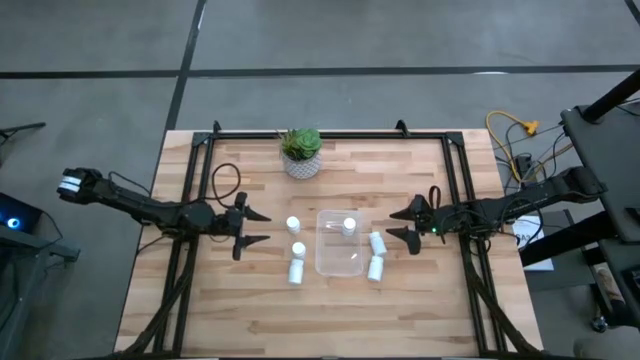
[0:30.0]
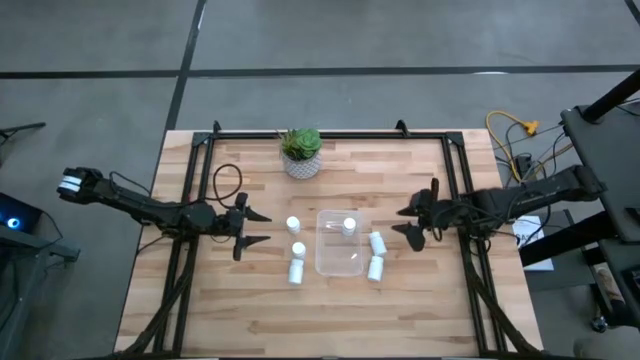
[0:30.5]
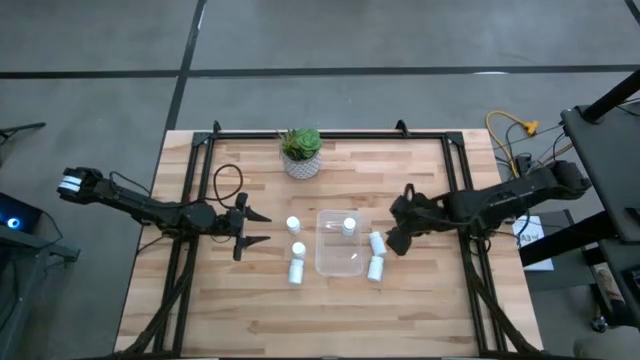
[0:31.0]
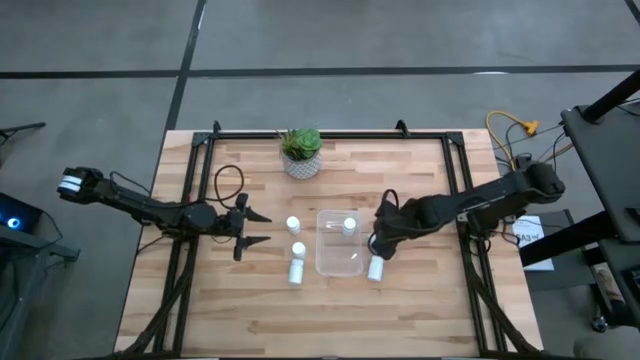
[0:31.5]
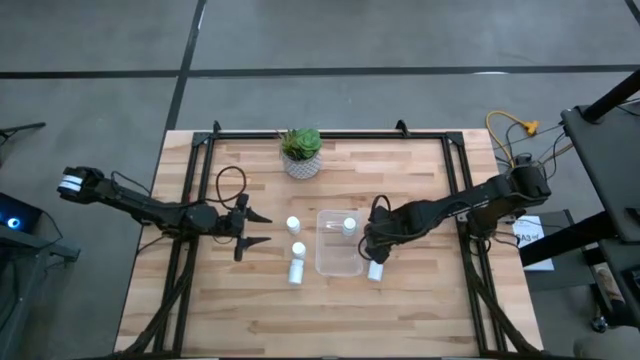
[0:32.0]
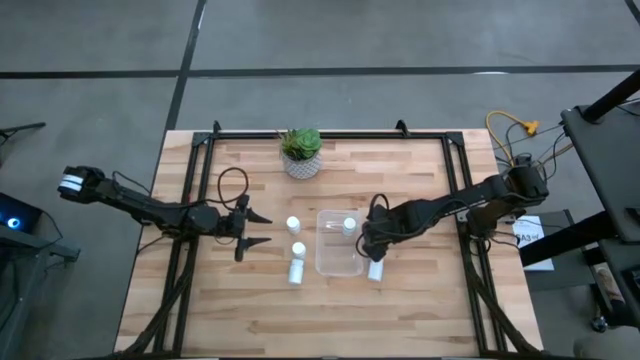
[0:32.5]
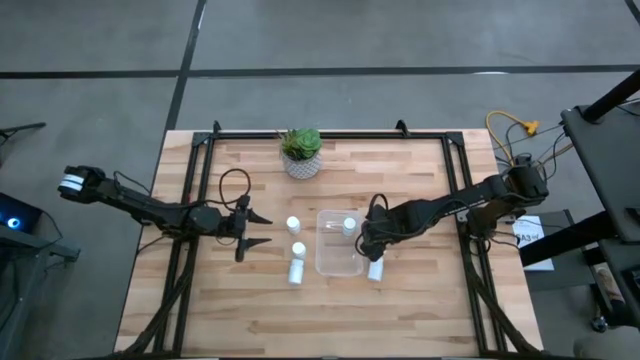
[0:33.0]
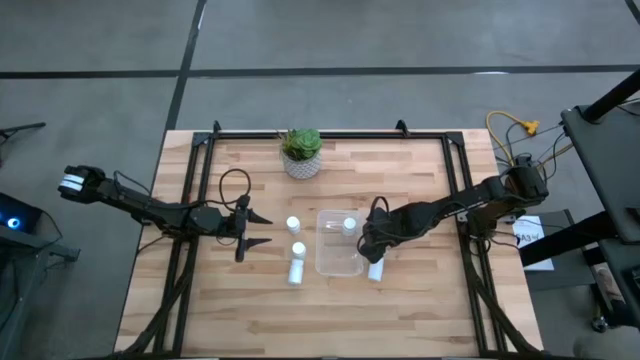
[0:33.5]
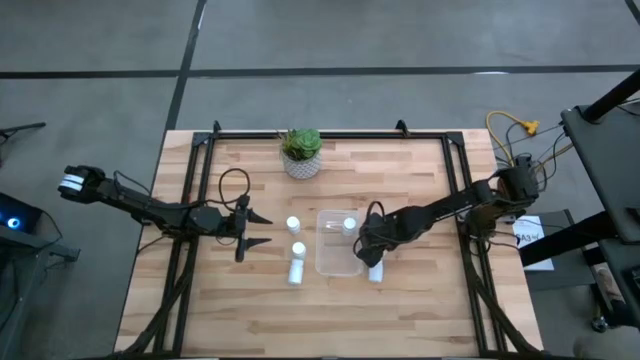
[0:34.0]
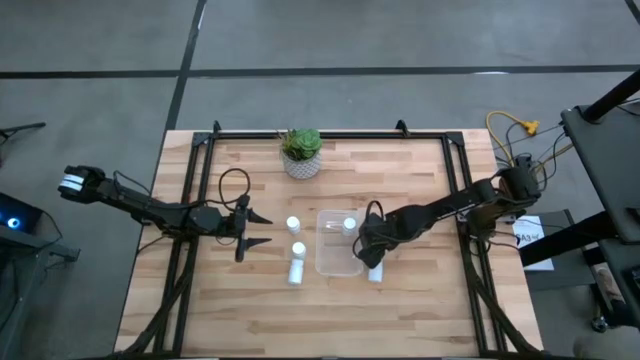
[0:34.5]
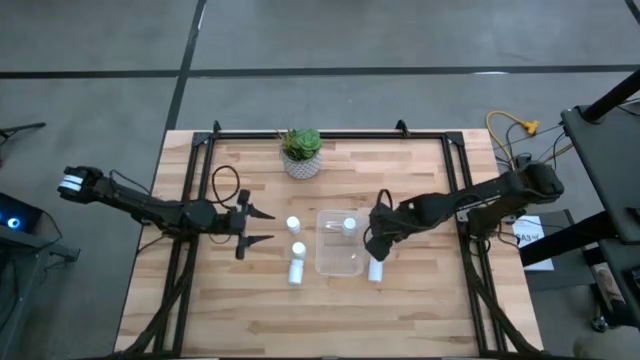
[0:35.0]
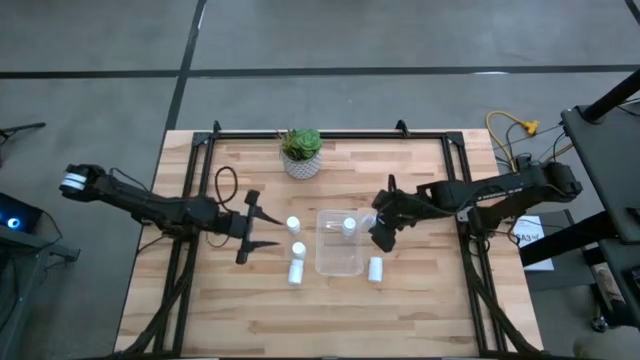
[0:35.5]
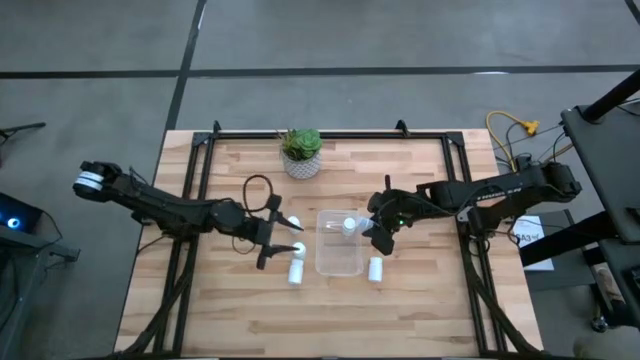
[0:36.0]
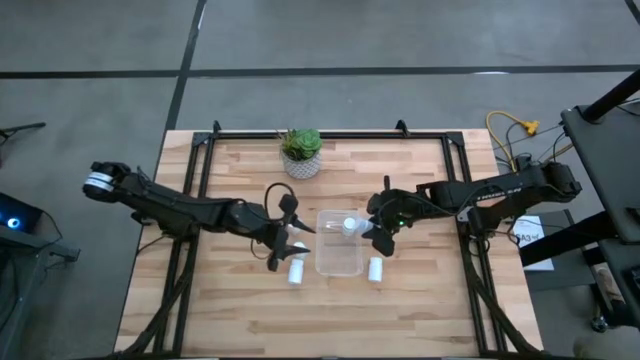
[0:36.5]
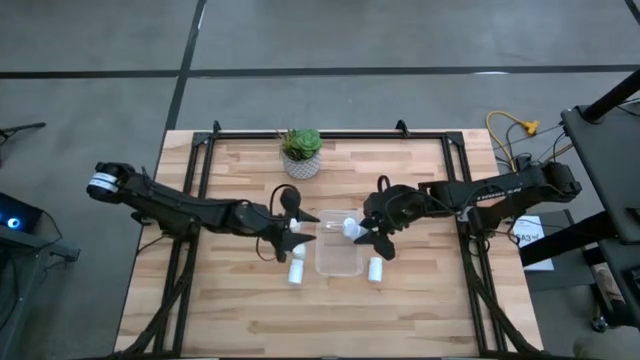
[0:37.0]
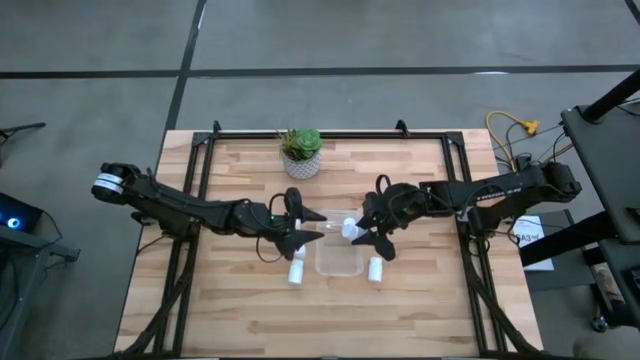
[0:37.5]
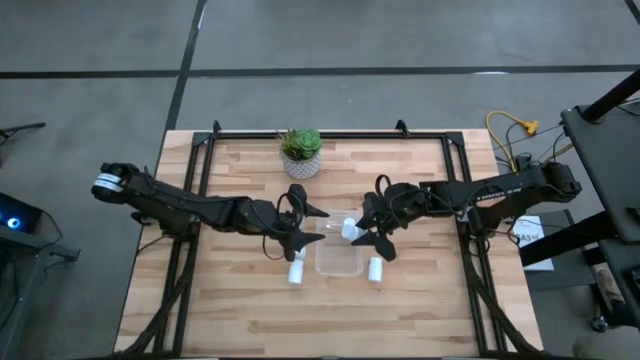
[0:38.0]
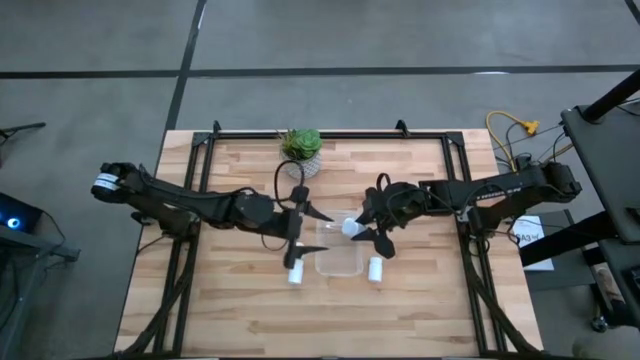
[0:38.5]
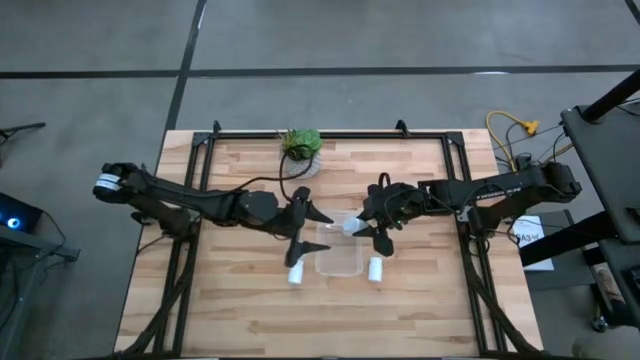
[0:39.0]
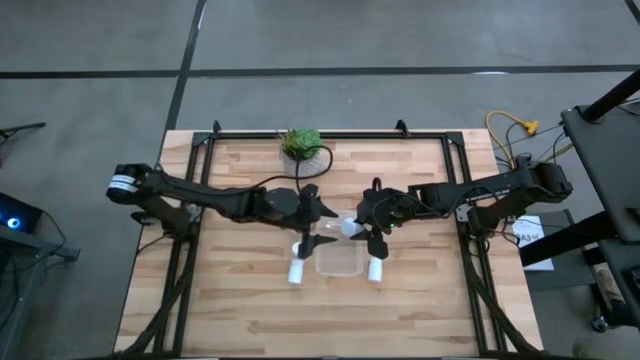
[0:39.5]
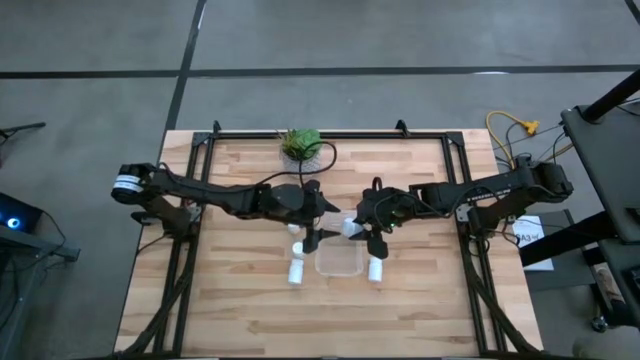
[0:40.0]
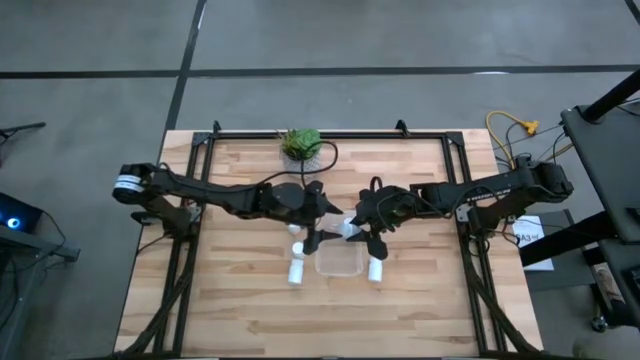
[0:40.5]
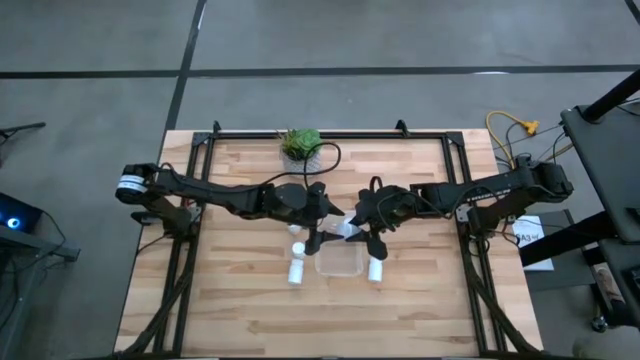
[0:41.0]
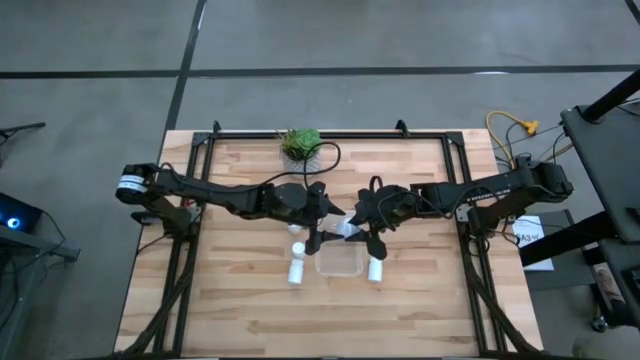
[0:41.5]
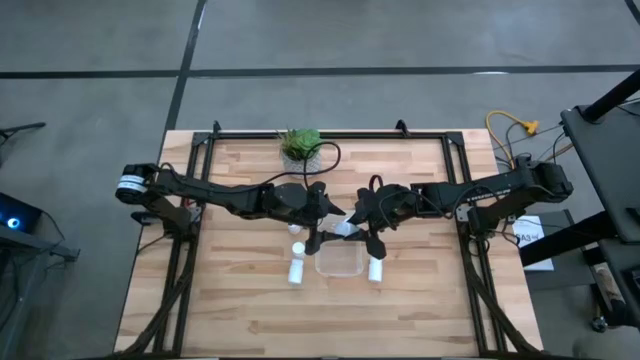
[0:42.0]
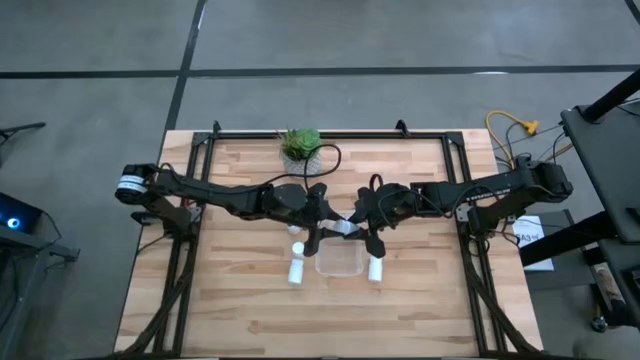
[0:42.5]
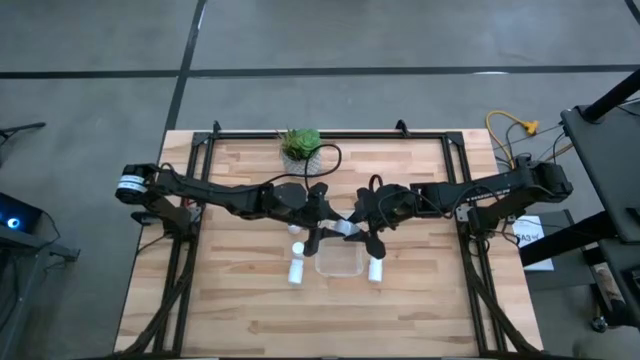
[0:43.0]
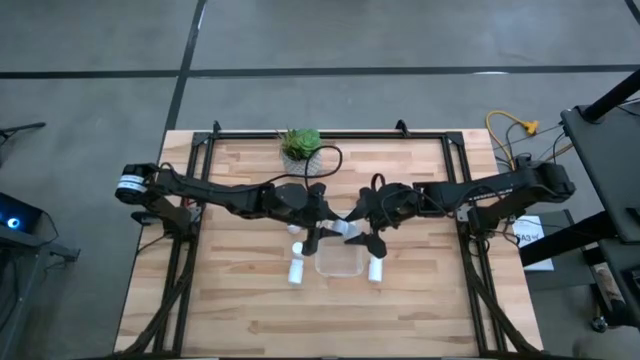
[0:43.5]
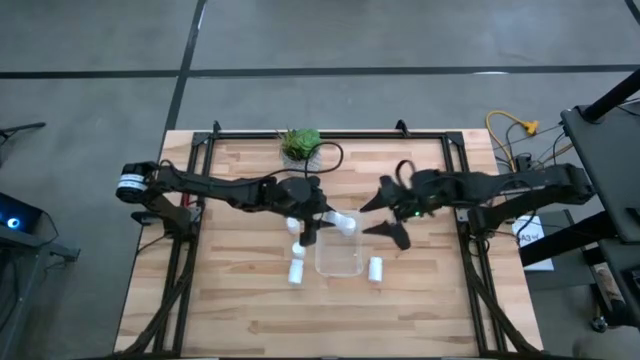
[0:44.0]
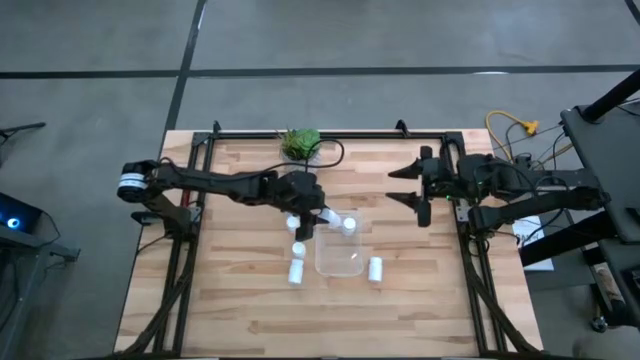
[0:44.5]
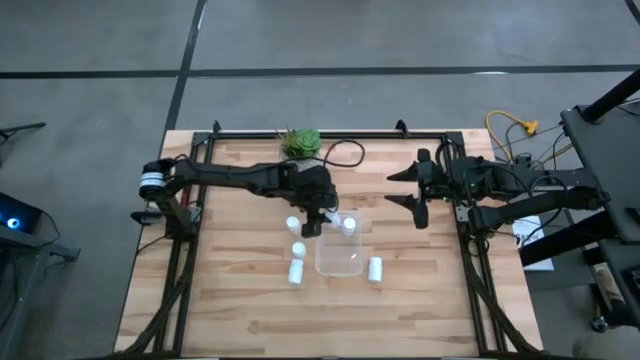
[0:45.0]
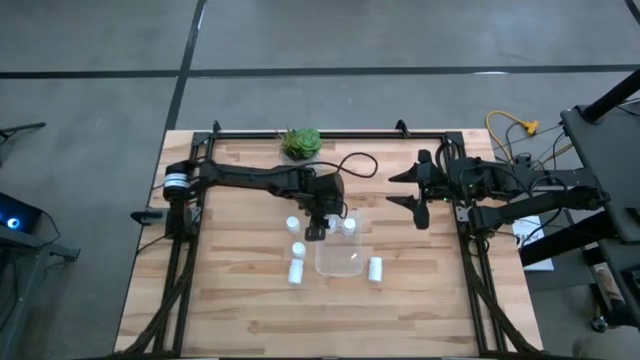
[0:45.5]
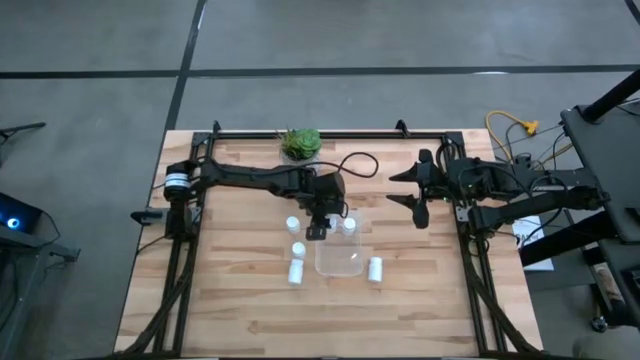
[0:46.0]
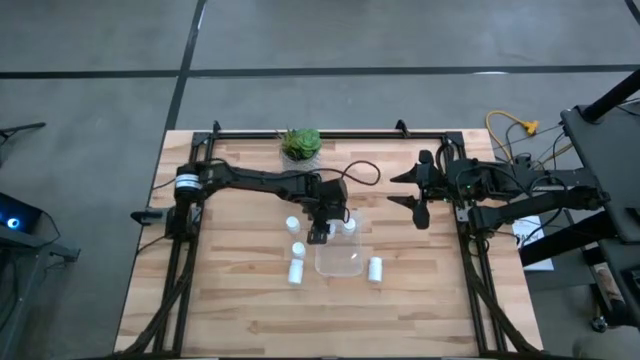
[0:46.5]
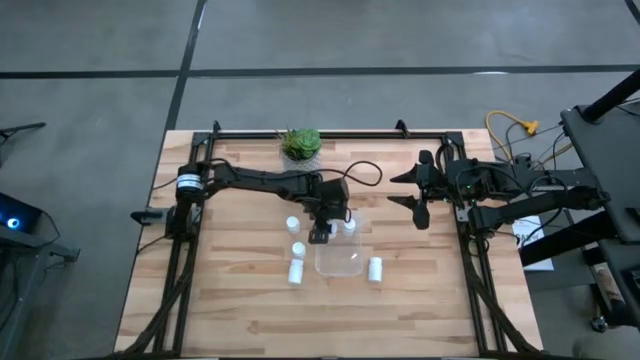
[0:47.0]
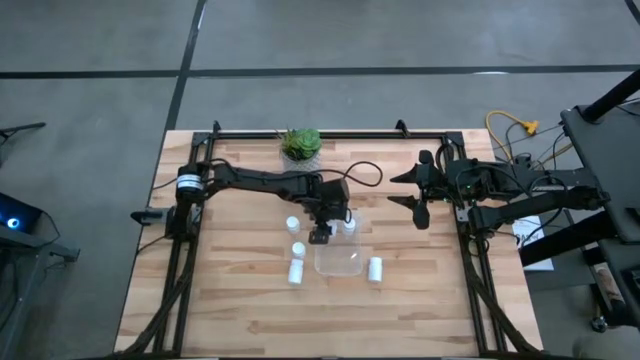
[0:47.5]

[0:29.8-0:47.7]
Task: Pick and place pill bottles into a basket
Put the white medicine bottle into the transparent bin

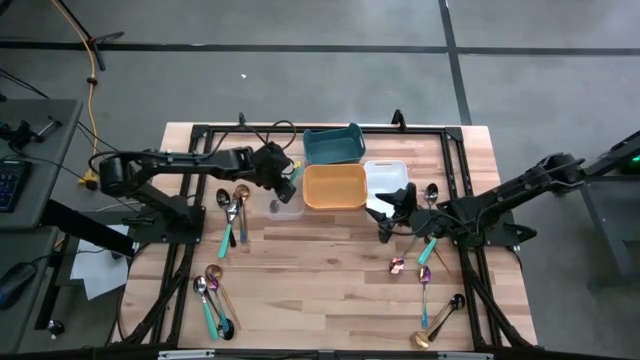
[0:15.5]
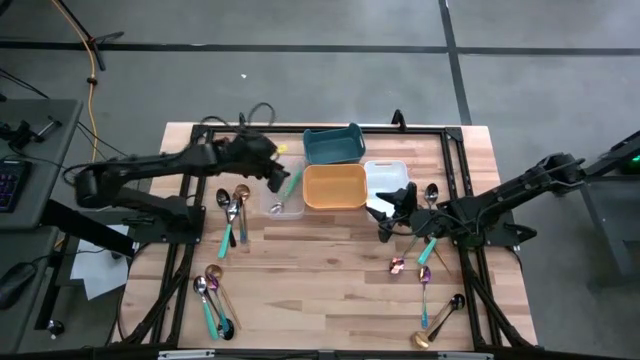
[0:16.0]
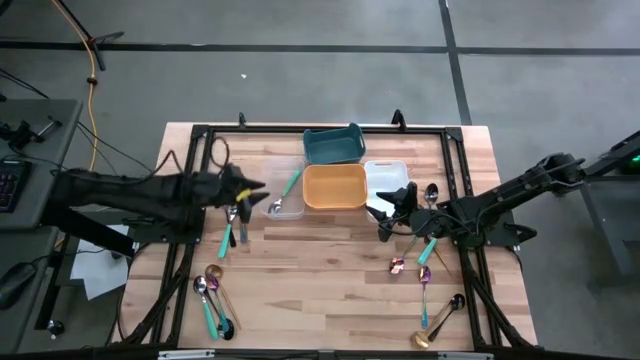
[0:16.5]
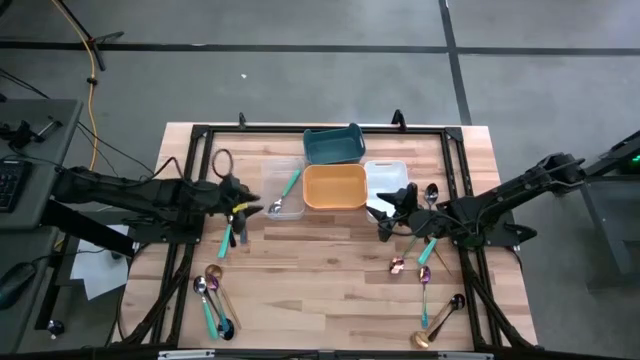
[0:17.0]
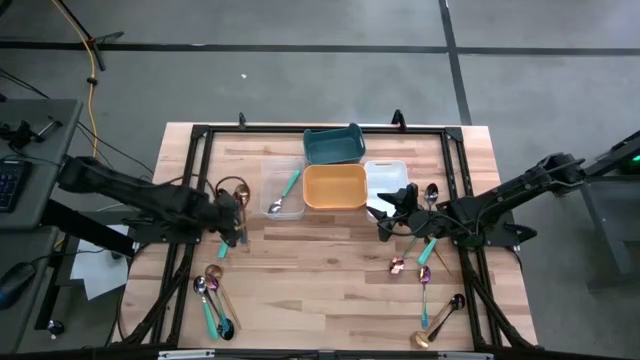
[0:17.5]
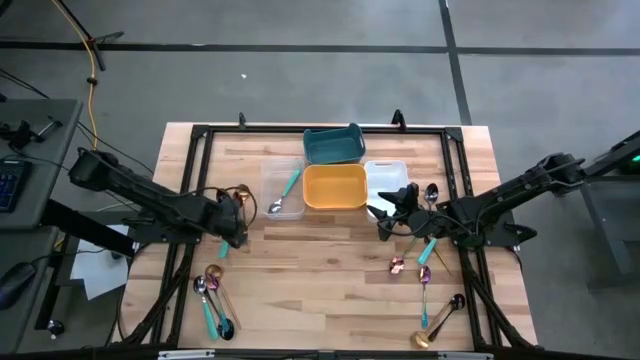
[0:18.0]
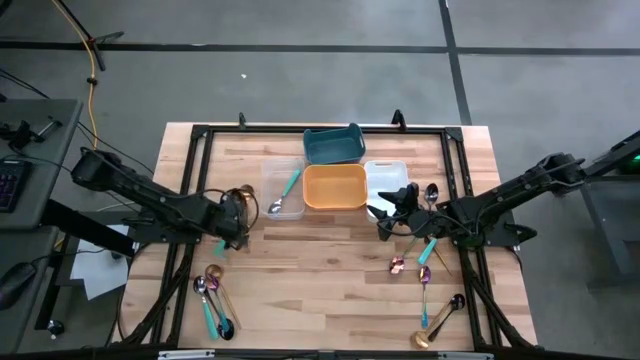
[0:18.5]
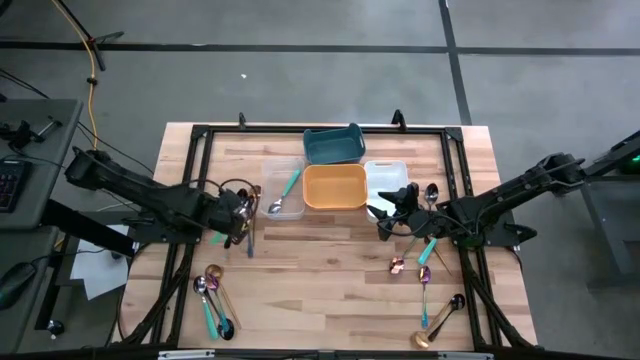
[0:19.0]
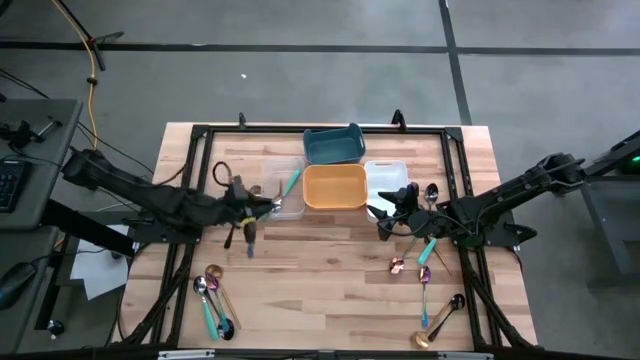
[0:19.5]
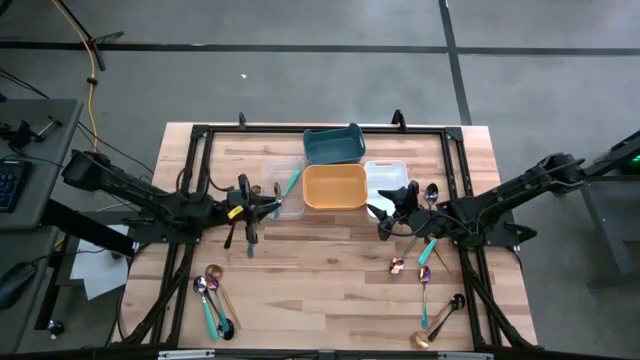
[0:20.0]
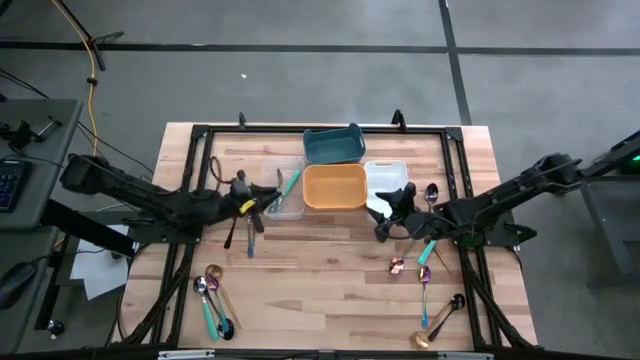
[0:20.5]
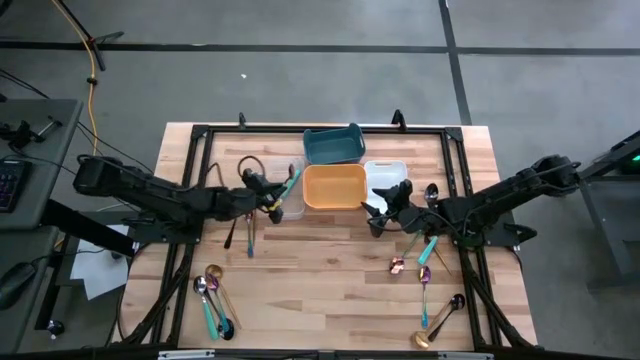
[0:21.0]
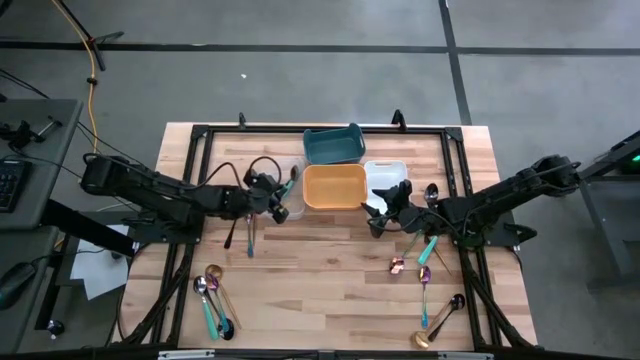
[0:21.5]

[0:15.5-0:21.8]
Task: Sort silverware by color (type)
Put the turquoise blue spoon into the transparent bin
